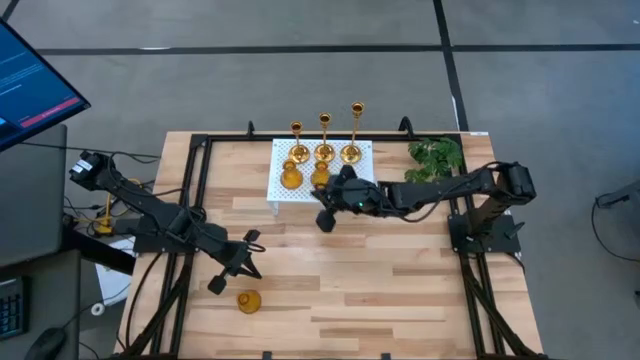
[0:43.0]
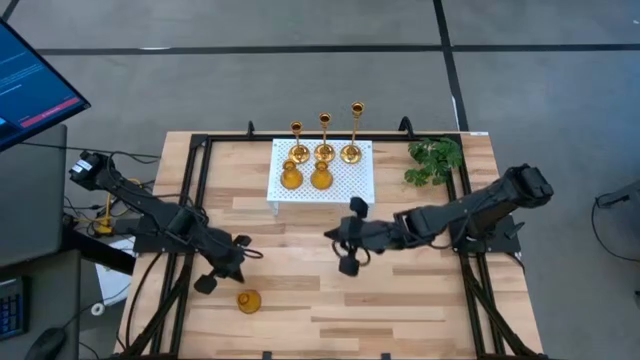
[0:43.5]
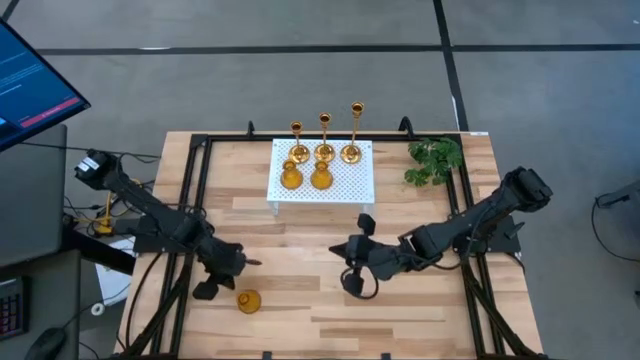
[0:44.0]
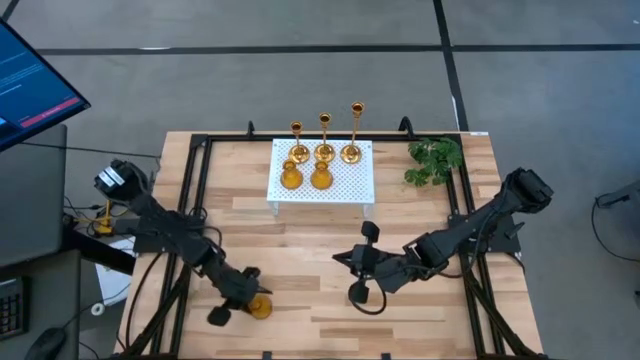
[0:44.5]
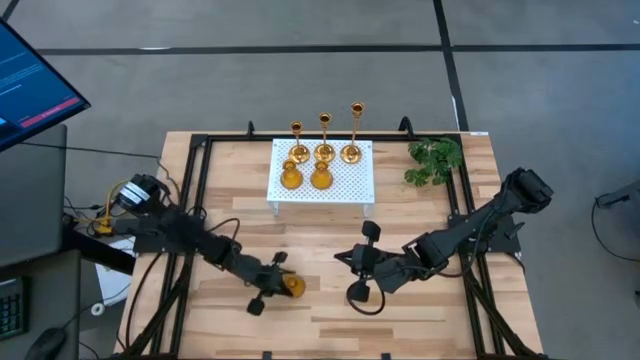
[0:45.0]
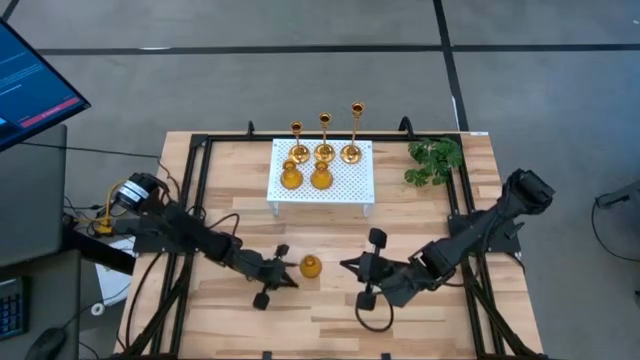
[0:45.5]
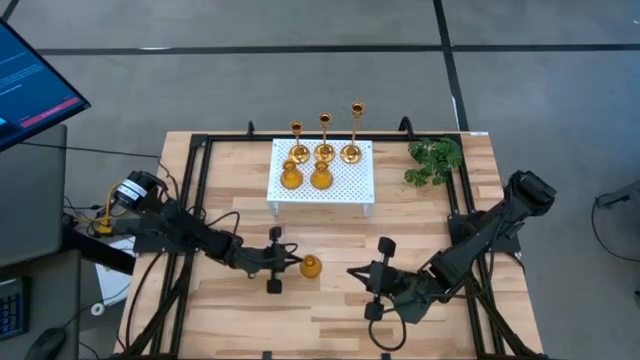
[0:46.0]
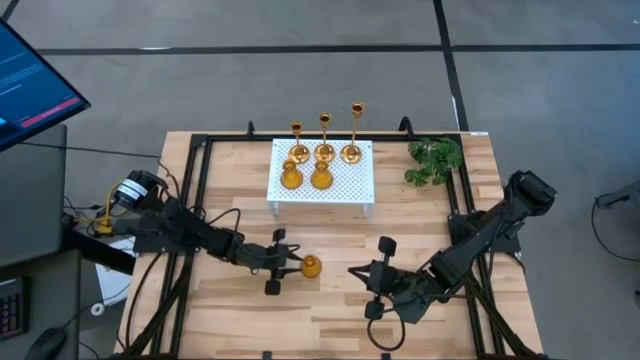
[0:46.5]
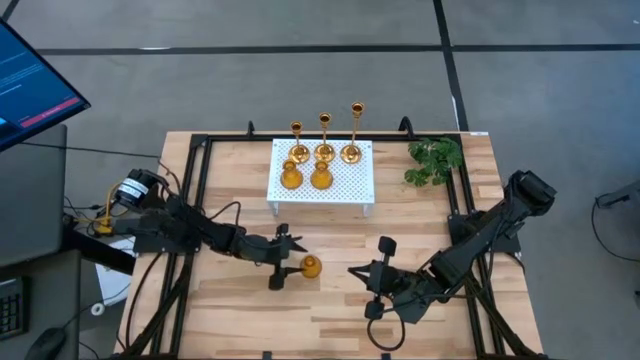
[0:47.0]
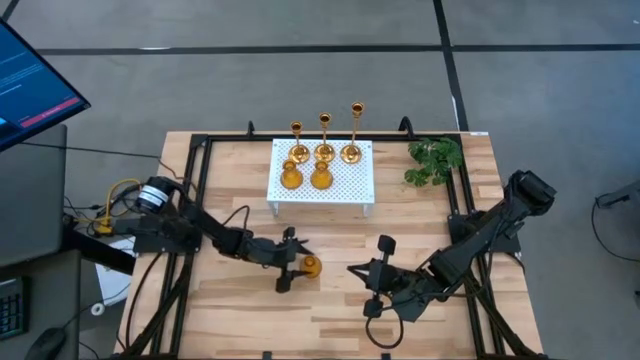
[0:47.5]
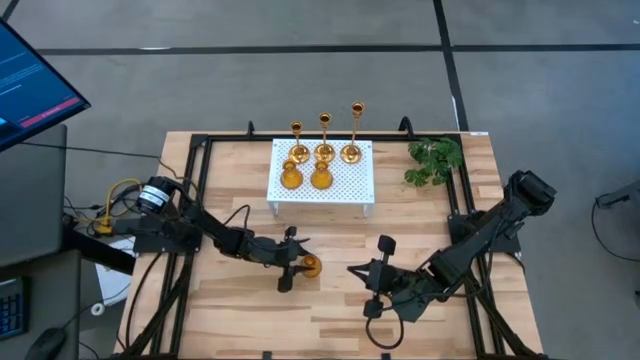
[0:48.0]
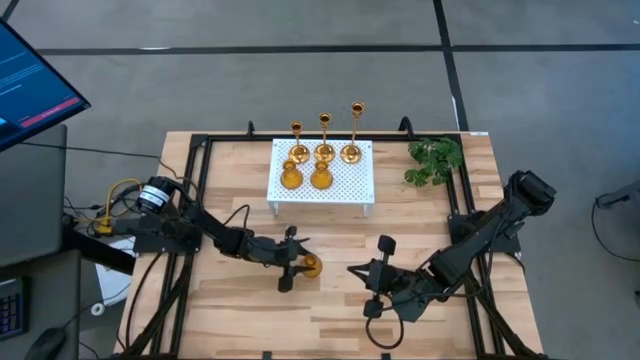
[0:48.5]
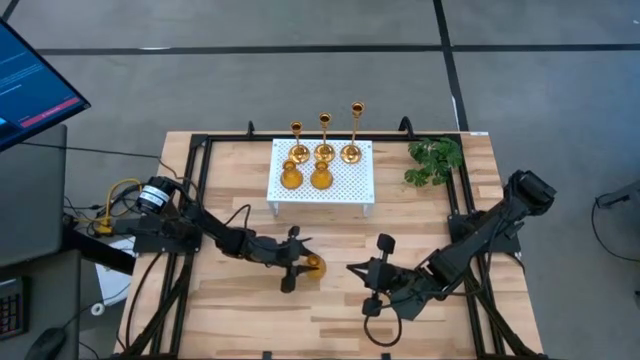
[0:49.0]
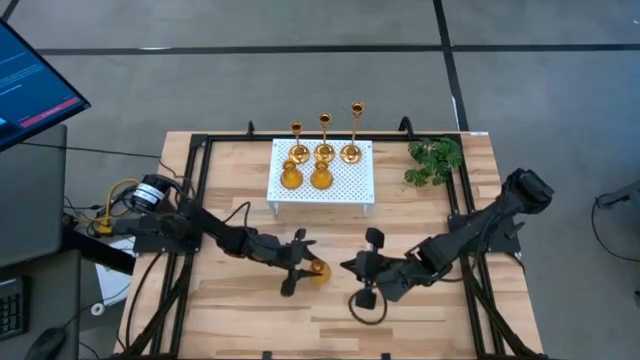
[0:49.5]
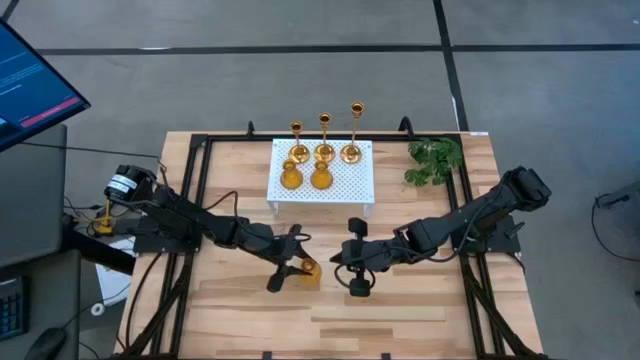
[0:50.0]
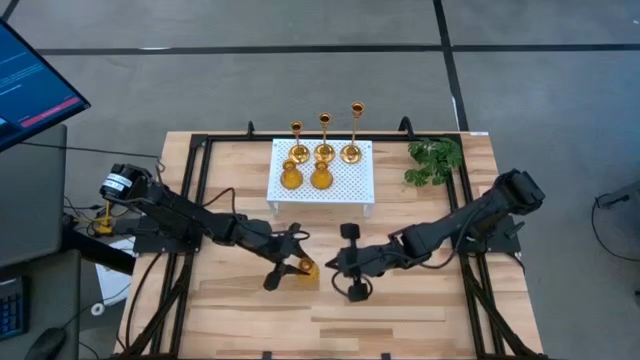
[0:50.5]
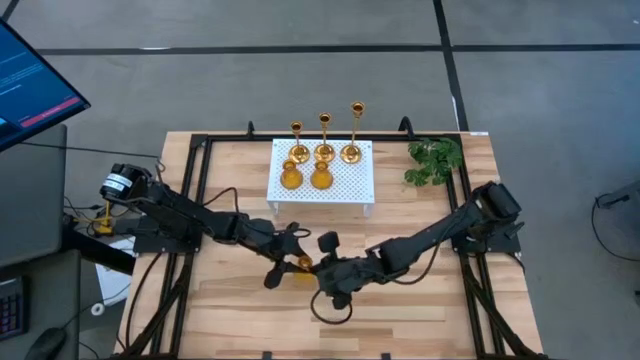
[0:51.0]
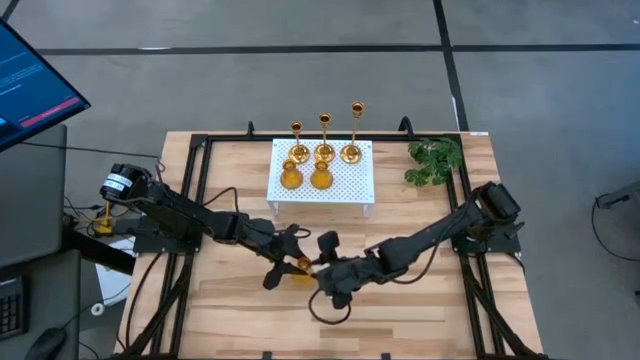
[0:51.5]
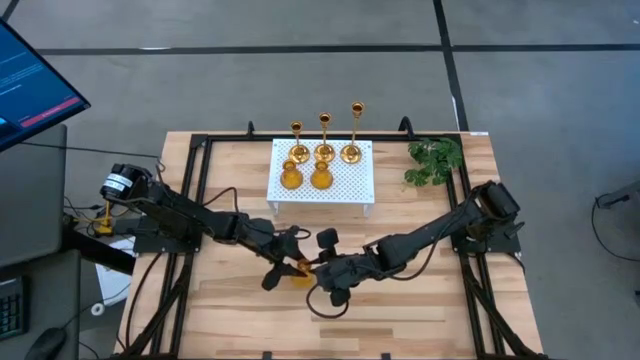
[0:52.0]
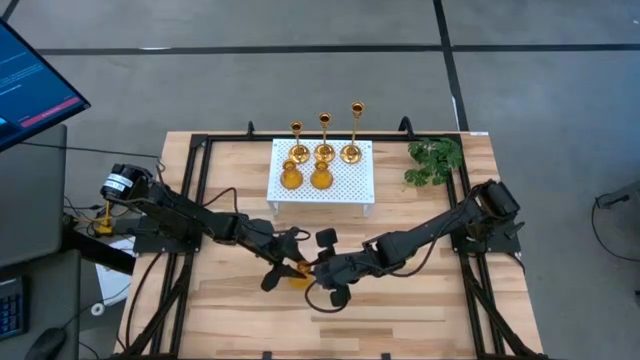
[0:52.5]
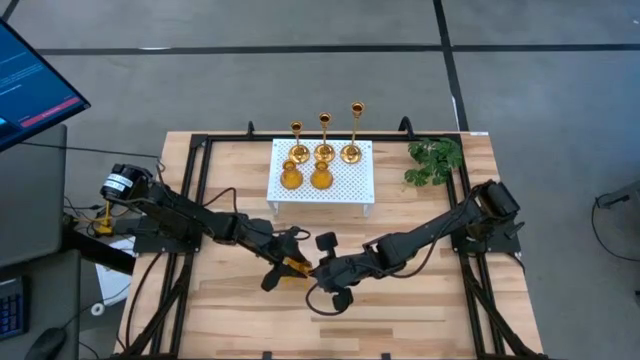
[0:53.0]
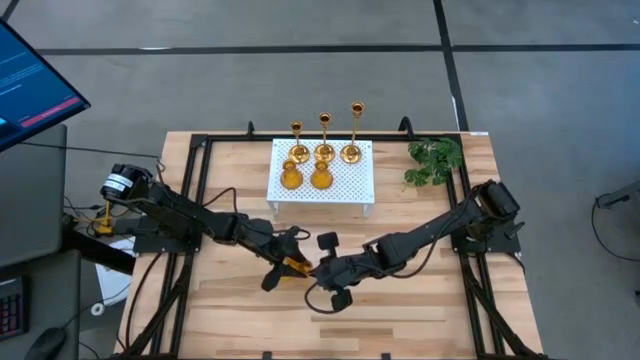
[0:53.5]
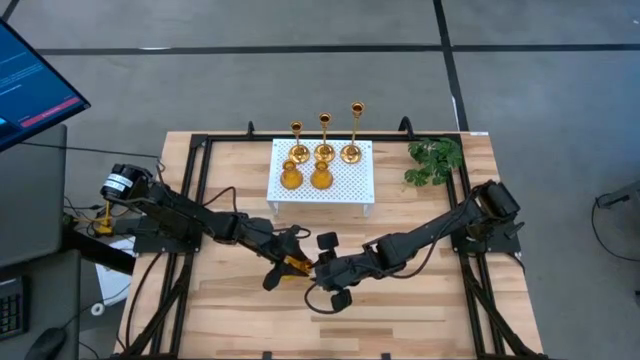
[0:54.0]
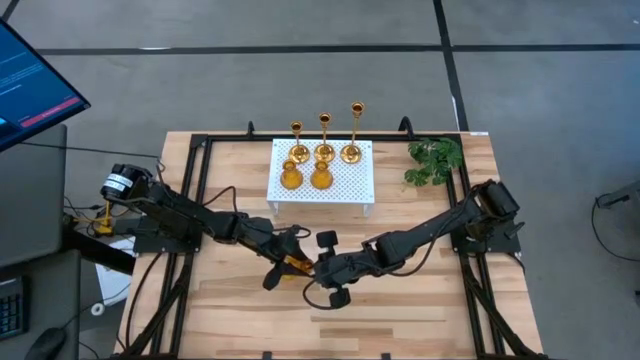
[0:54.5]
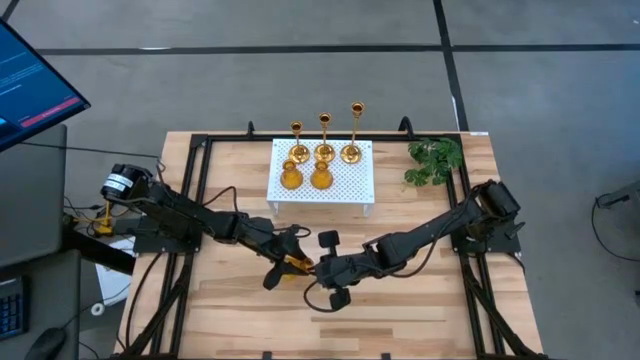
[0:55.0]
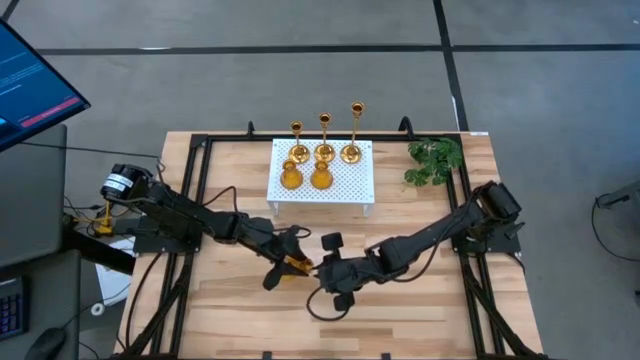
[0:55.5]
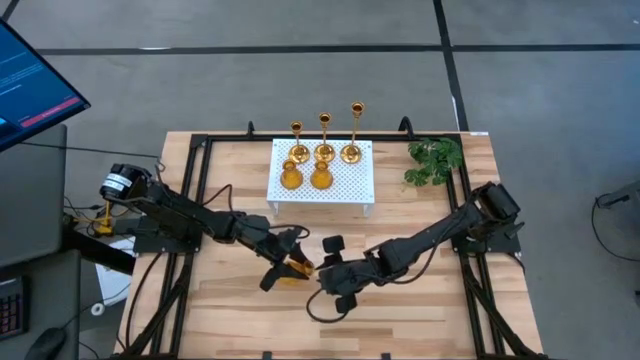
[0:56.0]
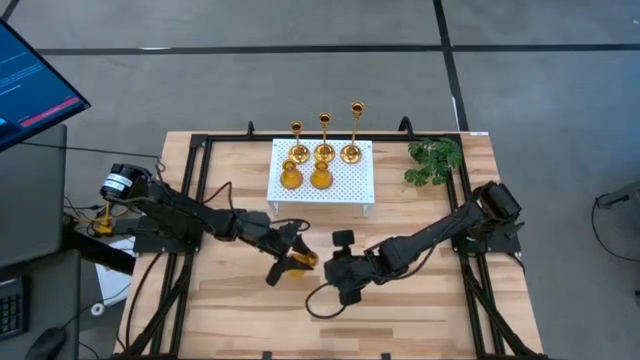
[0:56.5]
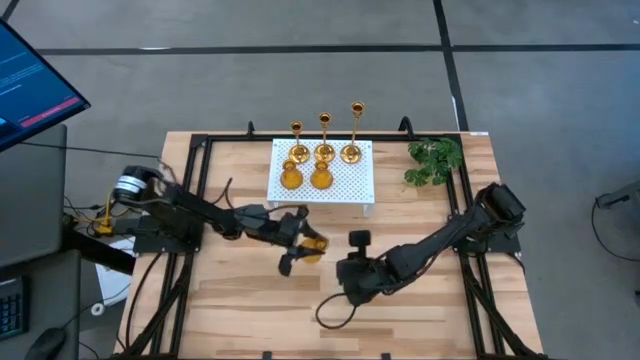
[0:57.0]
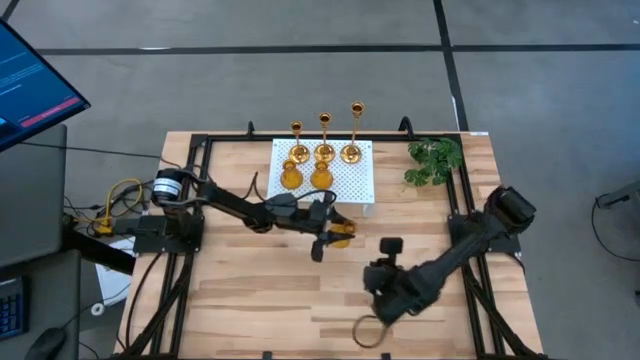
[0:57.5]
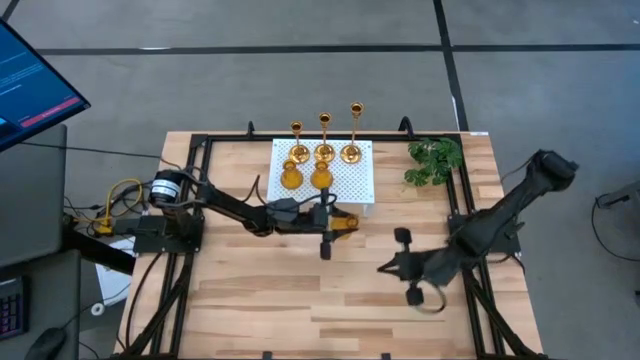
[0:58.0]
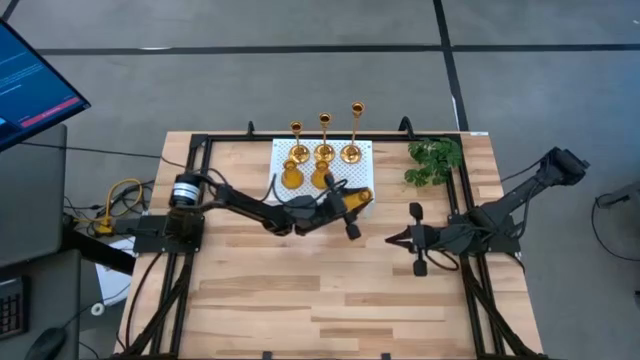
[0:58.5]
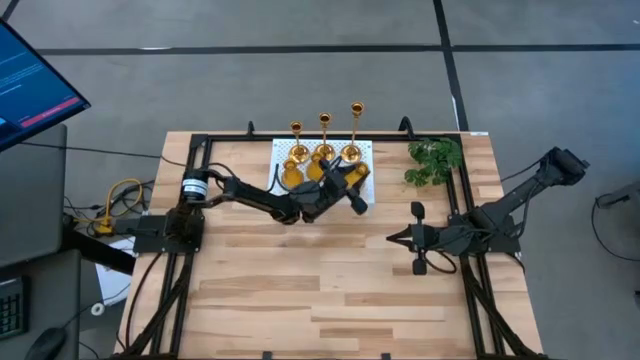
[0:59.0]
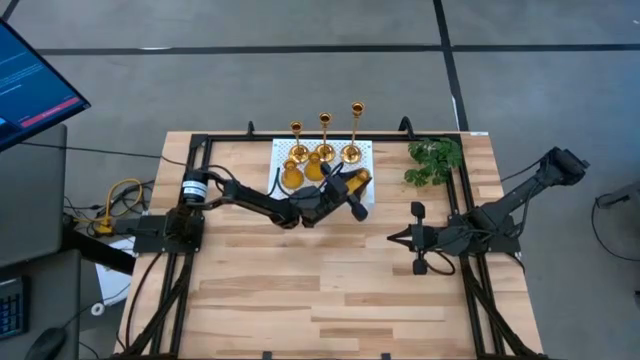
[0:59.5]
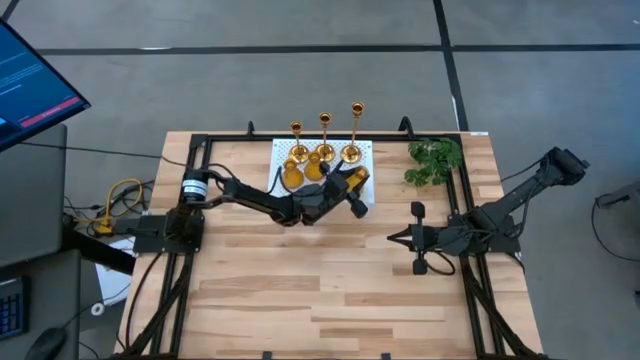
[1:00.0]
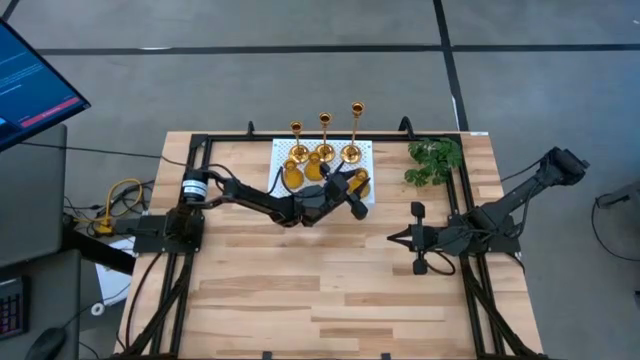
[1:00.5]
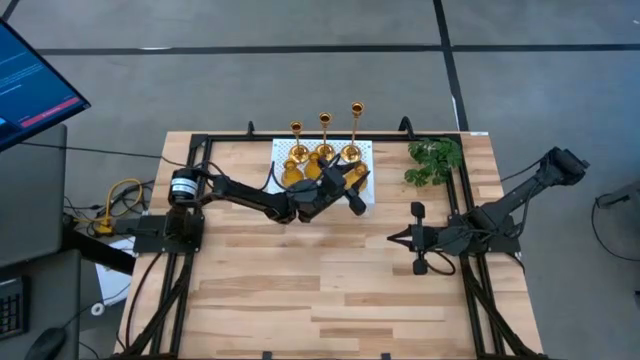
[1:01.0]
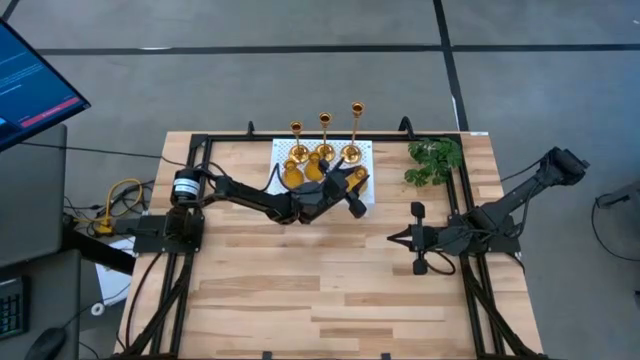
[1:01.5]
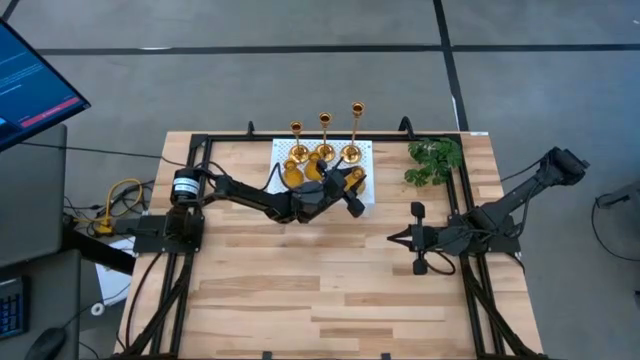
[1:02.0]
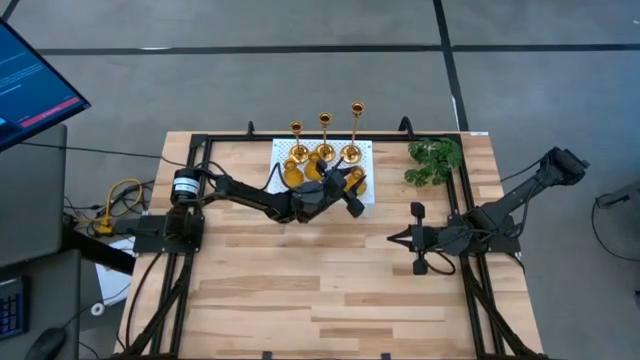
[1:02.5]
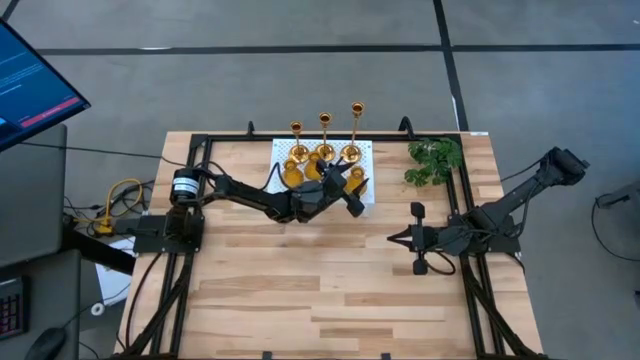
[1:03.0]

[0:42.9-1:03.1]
Task: Pick & Place candle stick holders
Put the yellow glass candle holder on the shelf aligned with the other yellow glass candle holders

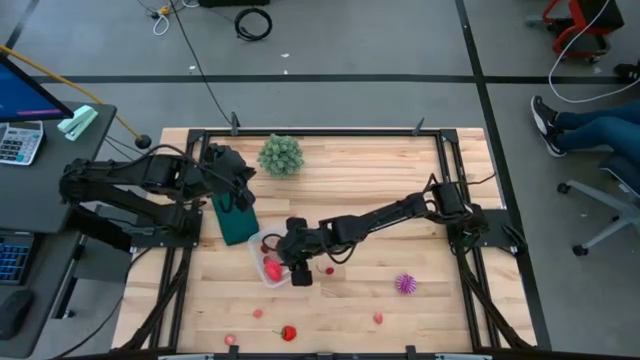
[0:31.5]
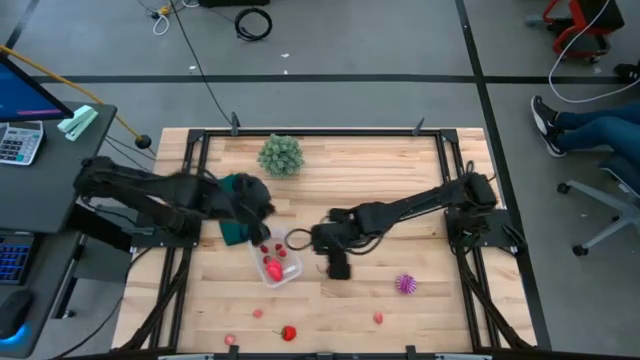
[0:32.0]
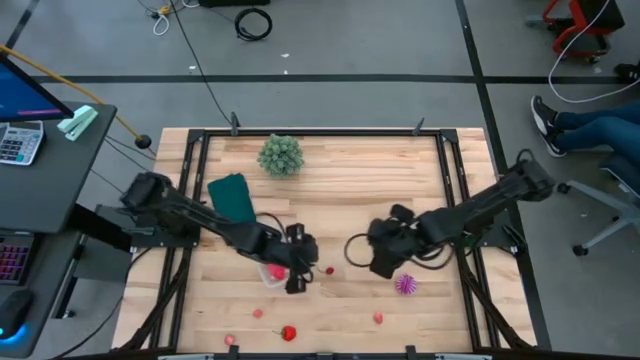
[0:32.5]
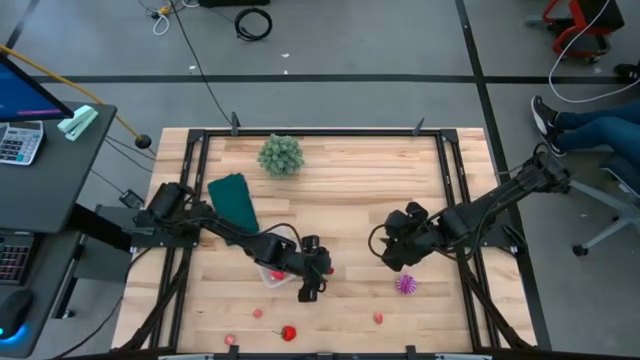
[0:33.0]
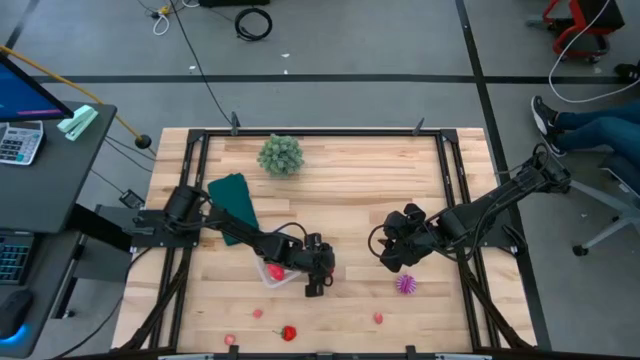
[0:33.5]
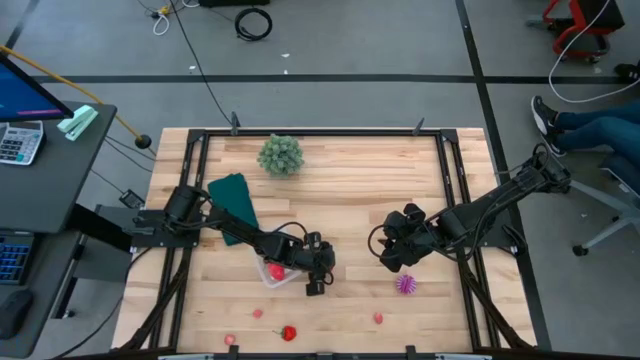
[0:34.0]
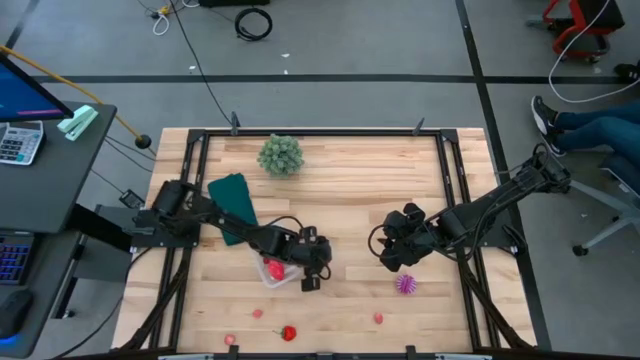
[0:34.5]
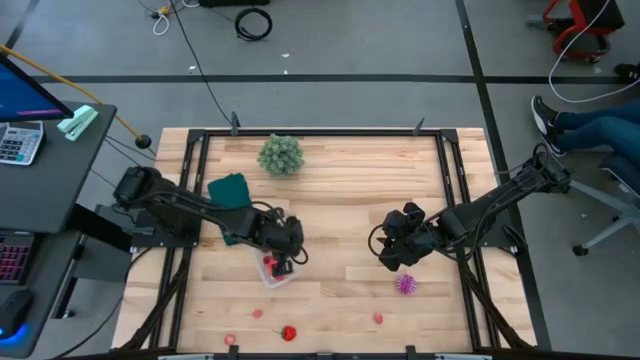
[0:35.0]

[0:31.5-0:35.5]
Task: Pick and placing Produce into tupperware
Put the red cherry into the transparent bin
